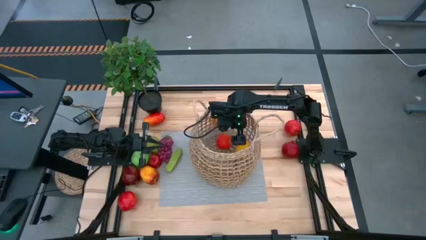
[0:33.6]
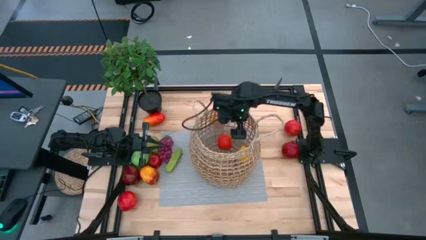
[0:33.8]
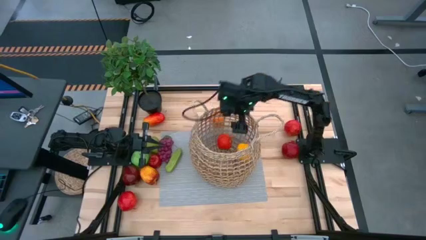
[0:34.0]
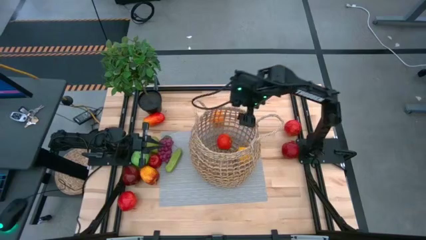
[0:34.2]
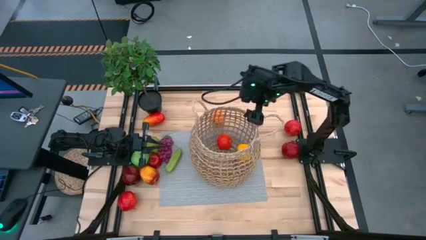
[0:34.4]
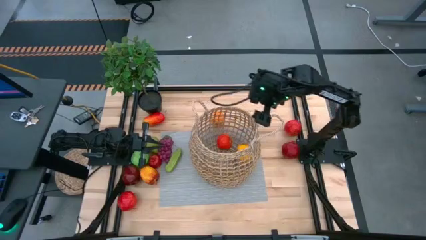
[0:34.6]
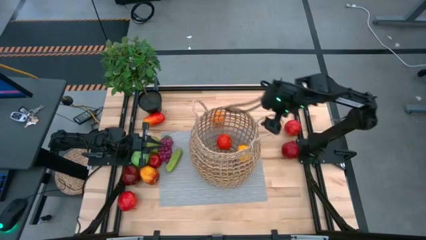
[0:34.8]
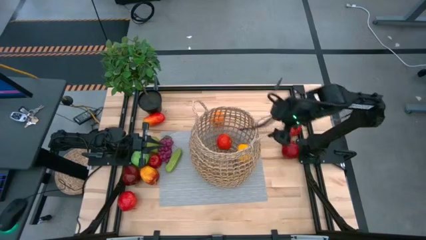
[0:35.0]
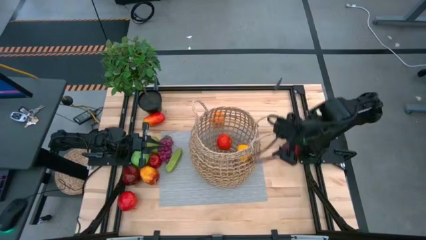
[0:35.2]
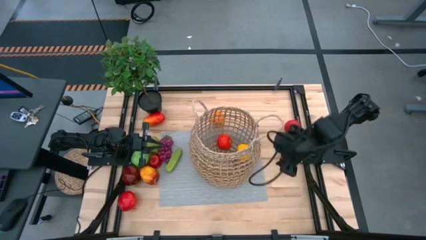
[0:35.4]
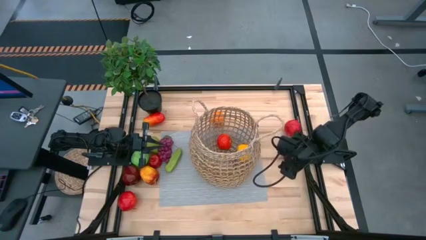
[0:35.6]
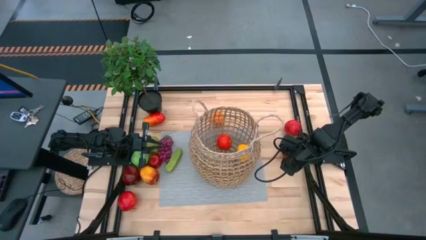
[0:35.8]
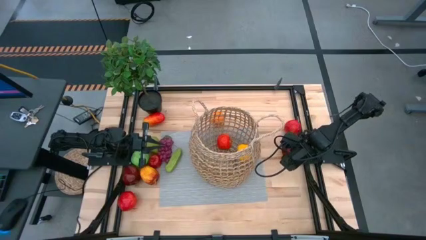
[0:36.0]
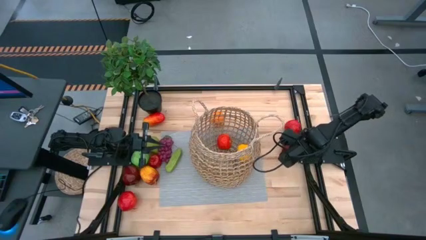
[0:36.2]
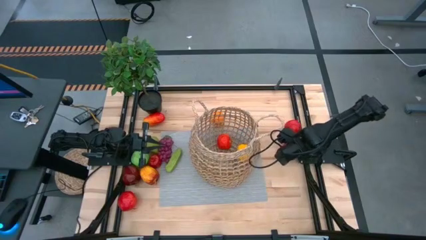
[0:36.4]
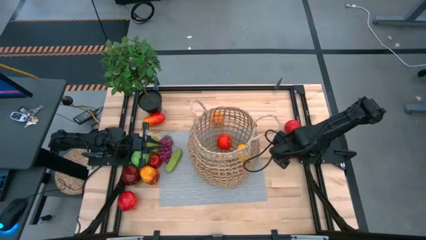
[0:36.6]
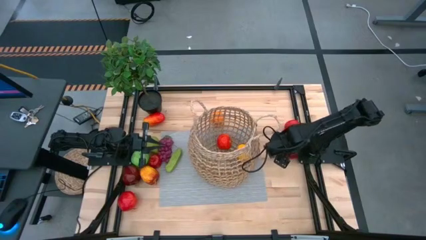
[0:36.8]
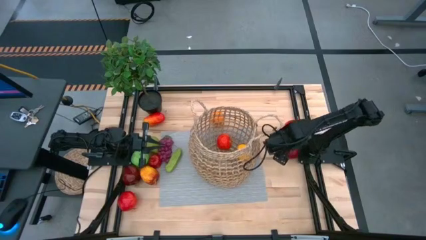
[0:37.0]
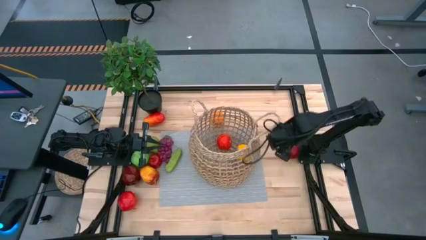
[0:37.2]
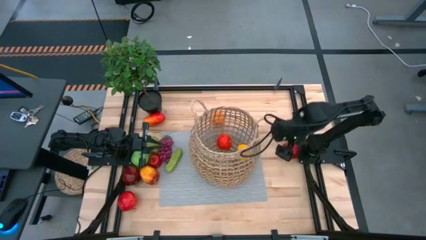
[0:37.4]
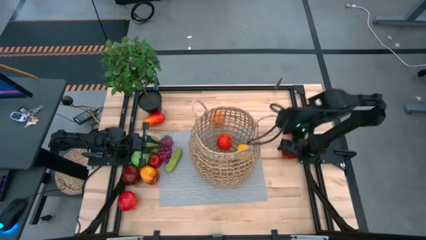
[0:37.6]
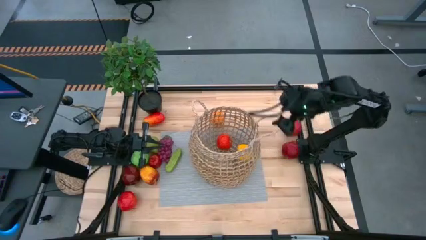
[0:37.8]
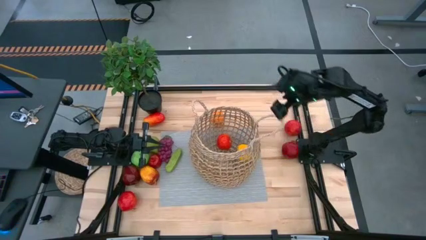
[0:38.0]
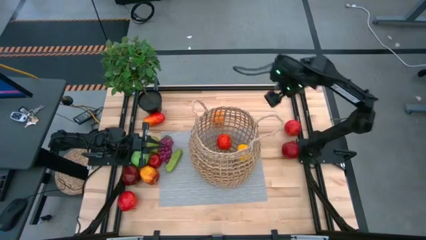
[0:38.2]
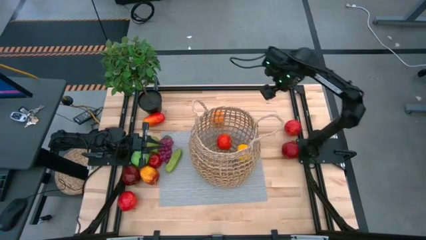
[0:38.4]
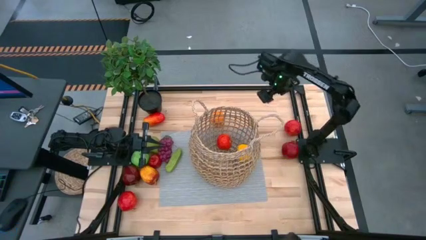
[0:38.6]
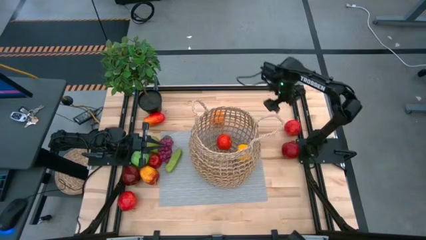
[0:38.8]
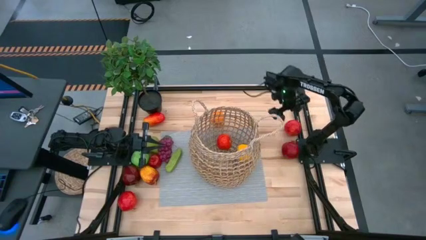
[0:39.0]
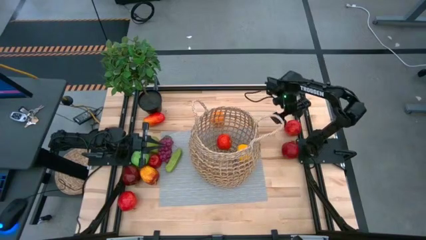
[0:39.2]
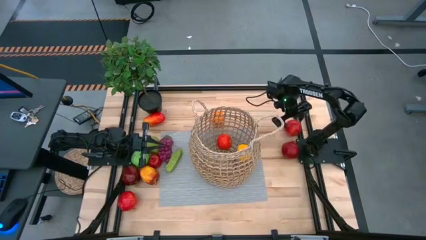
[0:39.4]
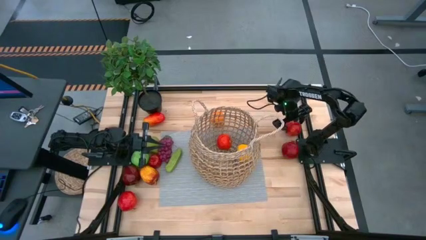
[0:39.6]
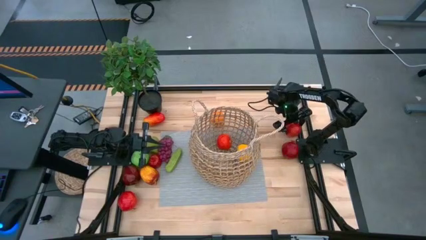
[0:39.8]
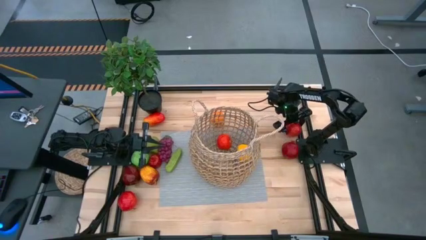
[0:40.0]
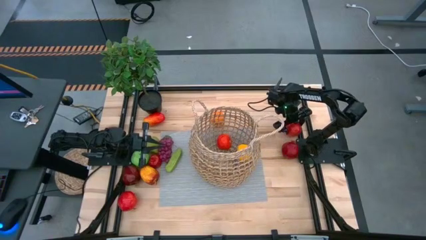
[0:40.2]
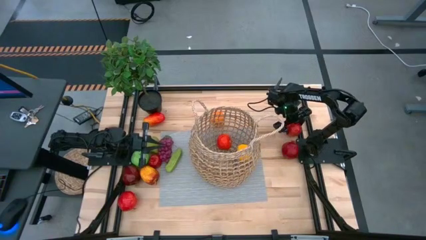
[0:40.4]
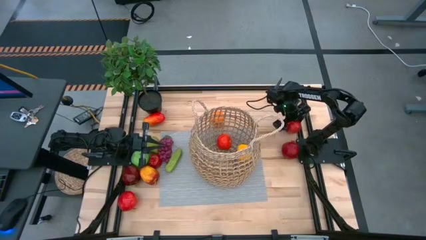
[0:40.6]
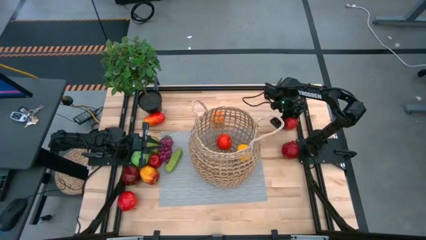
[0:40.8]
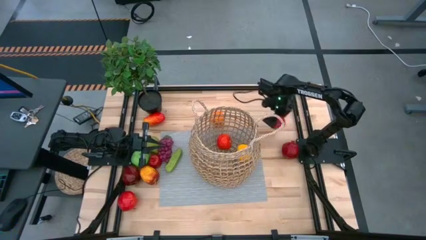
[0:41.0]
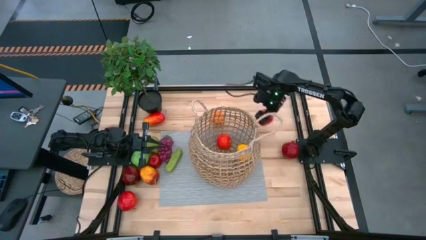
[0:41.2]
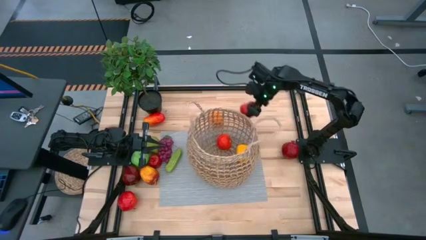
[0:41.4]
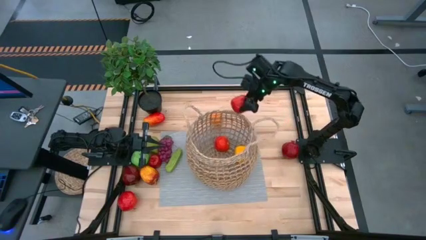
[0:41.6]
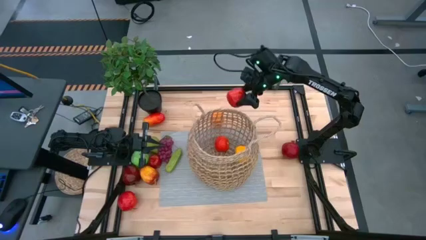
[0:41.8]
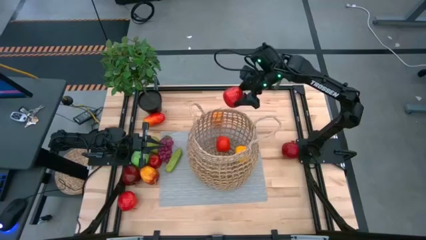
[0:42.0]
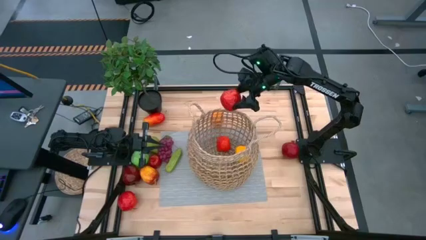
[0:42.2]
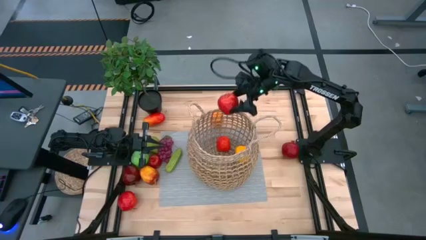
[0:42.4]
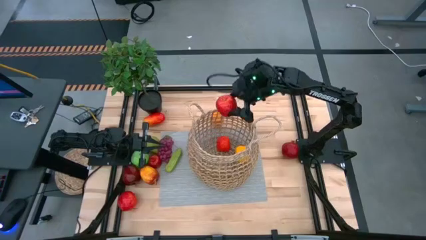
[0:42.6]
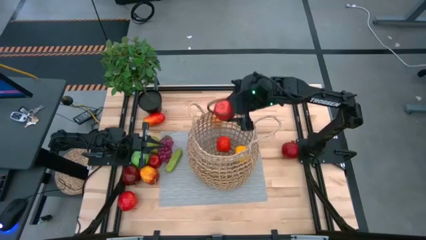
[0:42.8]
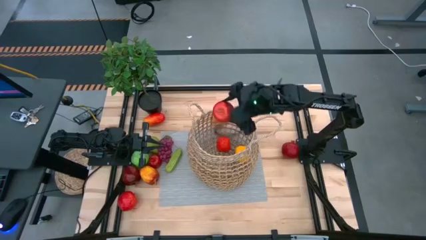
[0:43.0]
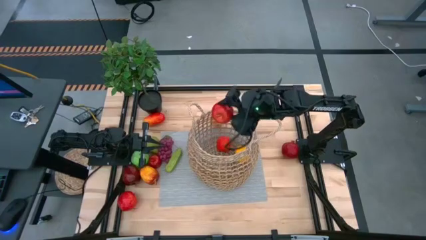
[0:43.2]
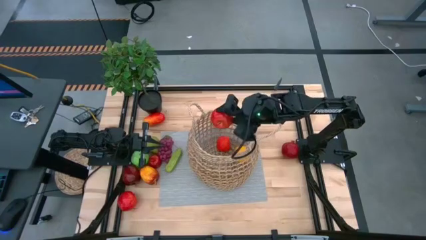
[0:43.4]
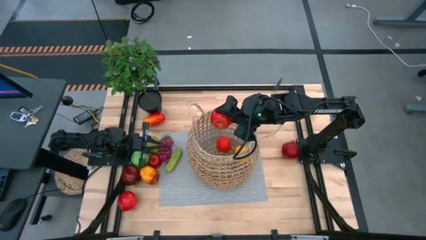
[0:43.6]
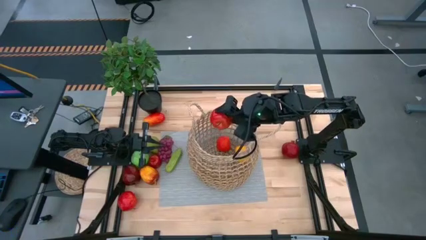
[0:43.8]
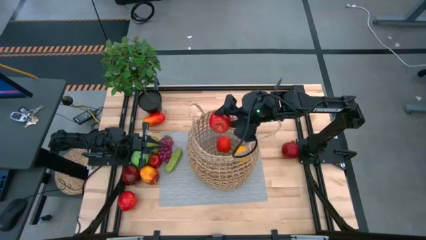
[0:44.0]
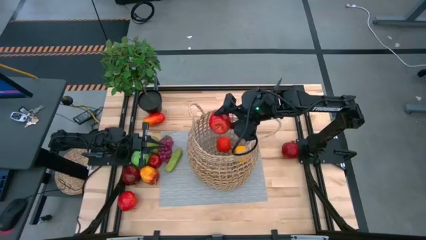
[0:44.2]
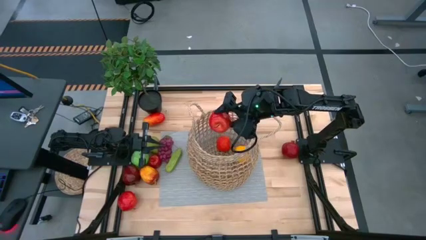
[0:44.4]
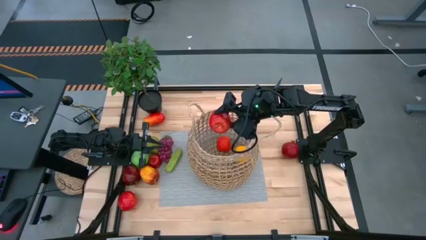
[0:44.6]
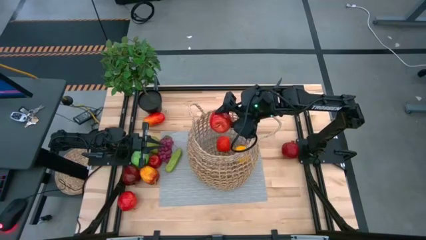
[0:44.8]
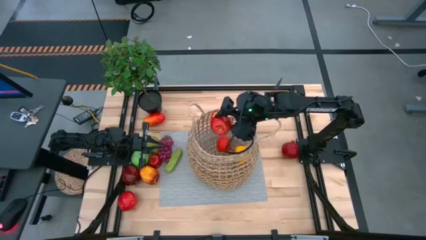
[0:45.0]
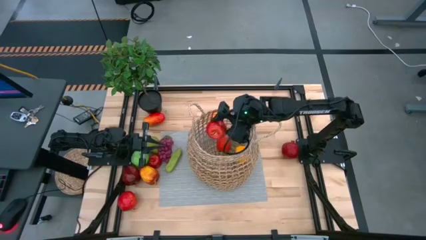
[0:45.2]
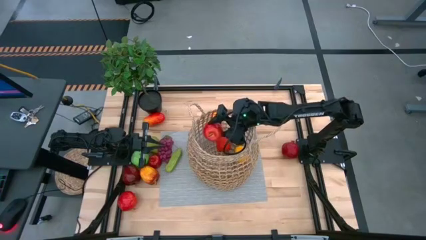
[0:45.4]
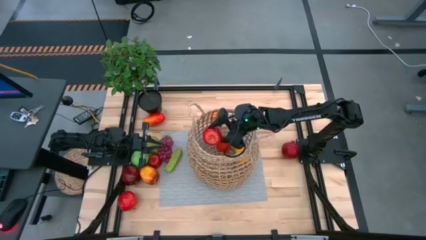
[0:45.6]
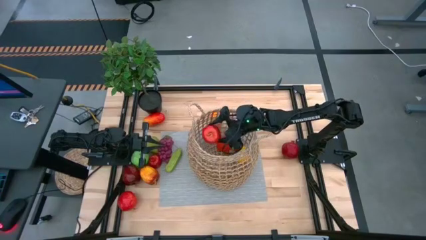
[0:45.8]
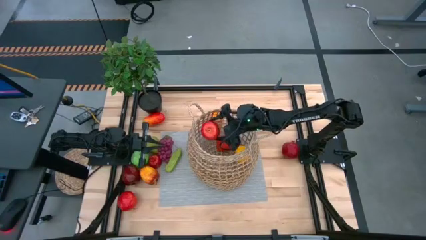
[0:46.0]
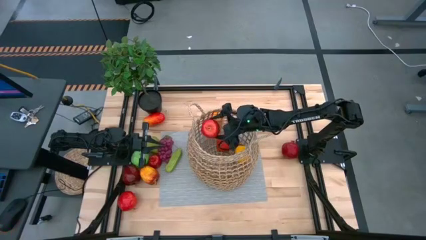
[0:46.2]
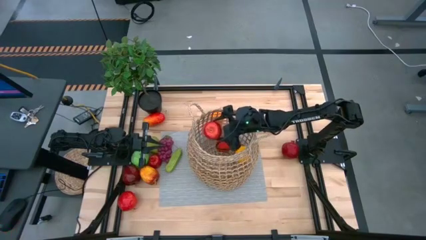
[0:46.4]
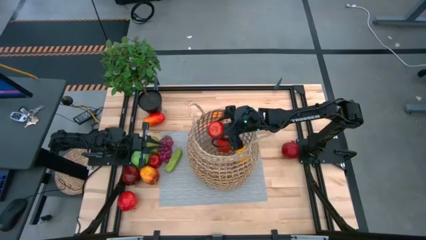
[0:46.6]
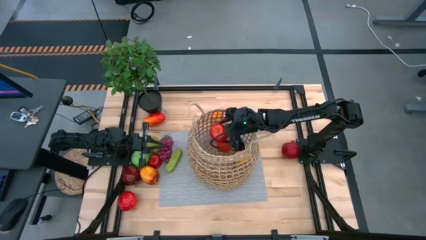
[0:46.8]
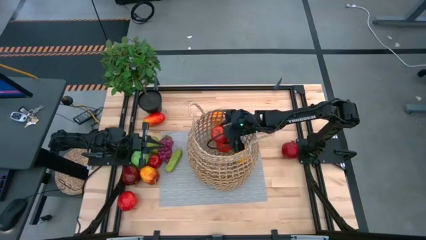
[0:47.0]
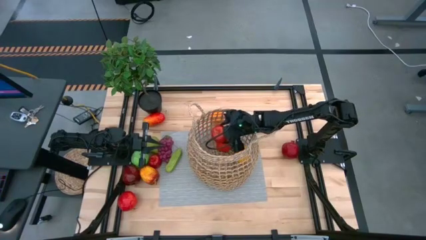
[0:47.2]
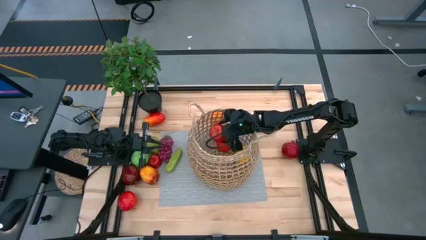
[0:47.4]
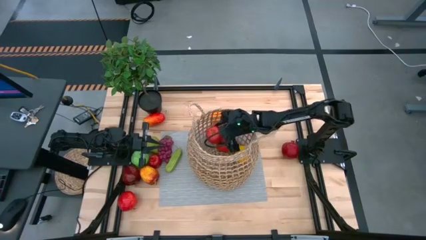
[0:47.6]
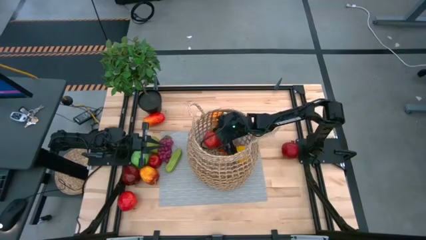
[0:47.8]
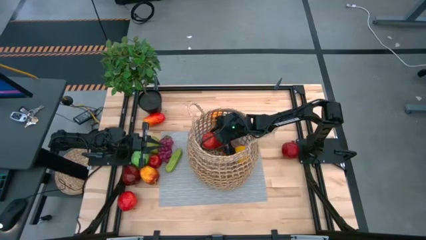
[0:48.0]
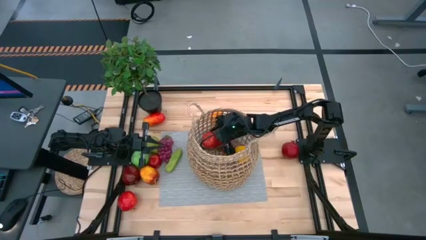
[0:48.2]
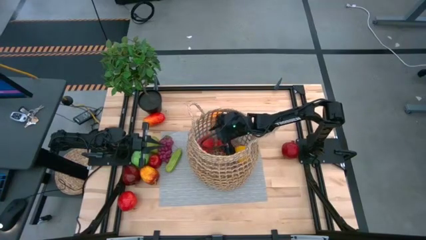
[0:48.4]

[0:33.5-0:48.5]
Task: Build produce basket
Put the red apple into the brown basket

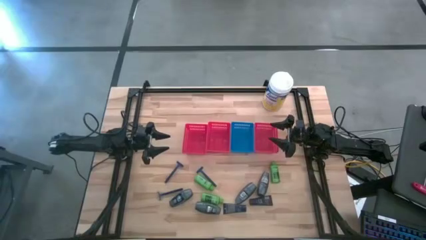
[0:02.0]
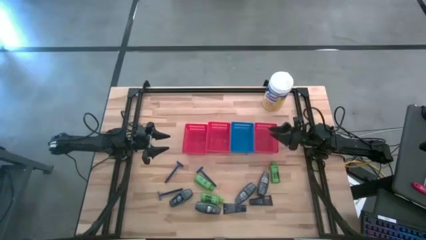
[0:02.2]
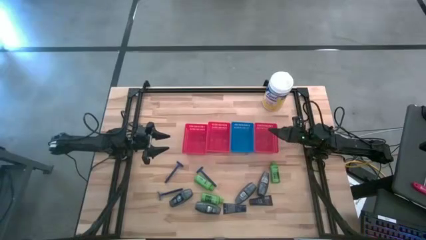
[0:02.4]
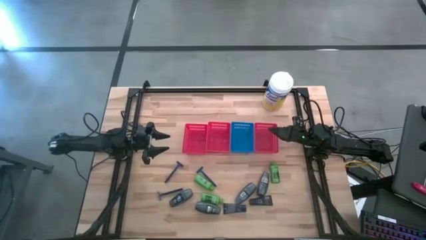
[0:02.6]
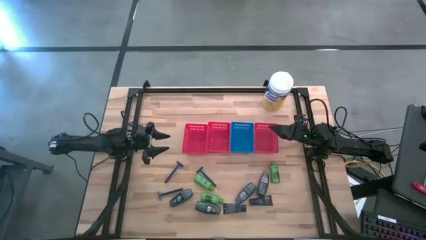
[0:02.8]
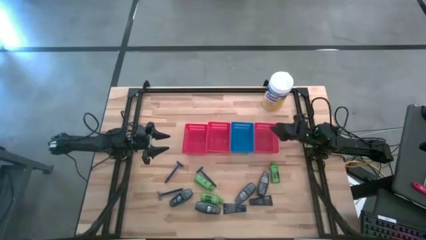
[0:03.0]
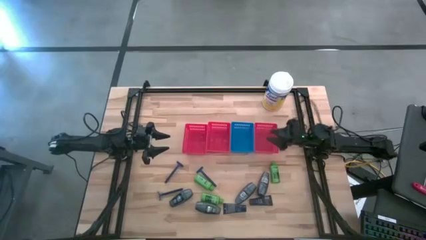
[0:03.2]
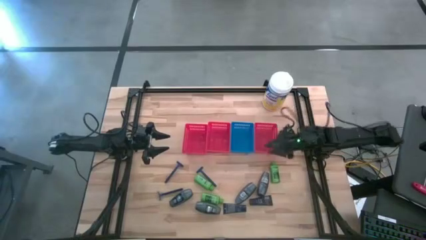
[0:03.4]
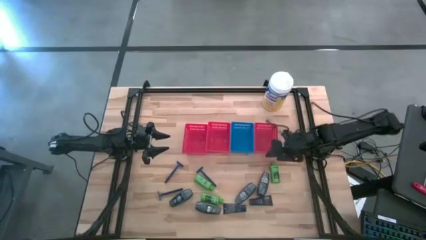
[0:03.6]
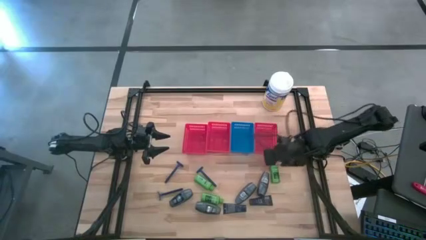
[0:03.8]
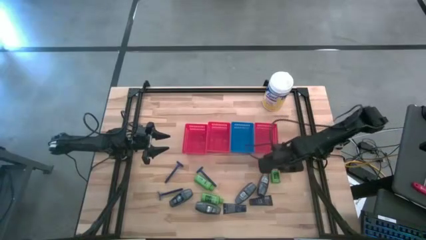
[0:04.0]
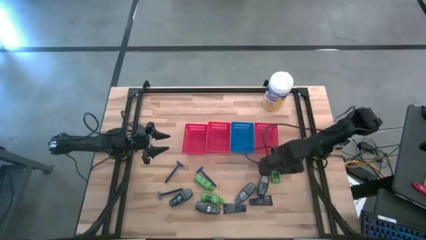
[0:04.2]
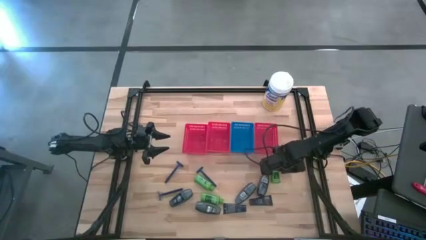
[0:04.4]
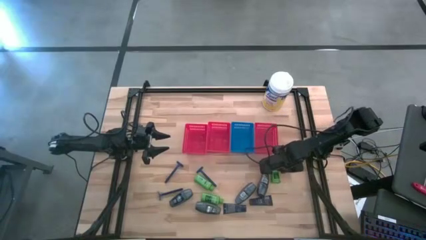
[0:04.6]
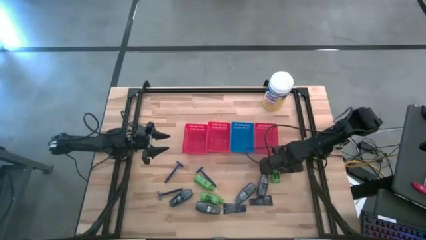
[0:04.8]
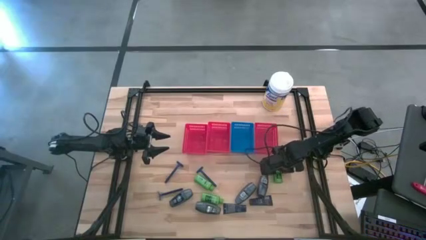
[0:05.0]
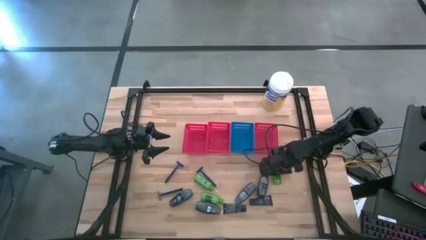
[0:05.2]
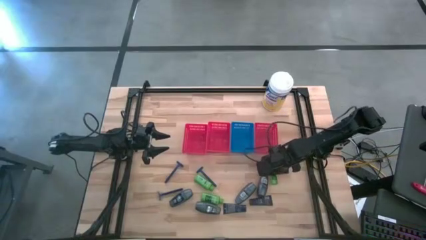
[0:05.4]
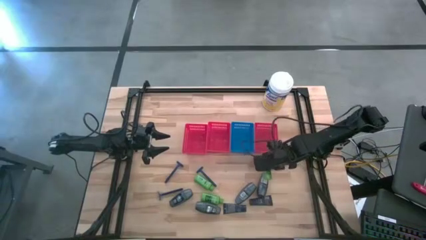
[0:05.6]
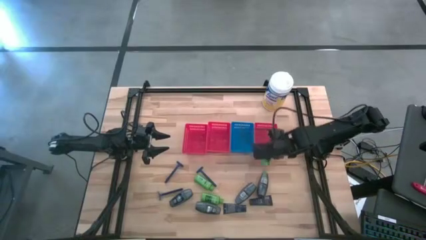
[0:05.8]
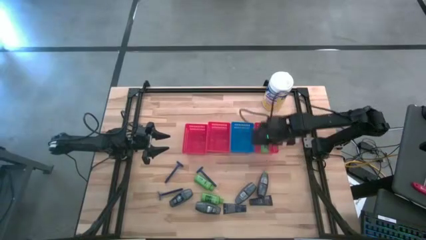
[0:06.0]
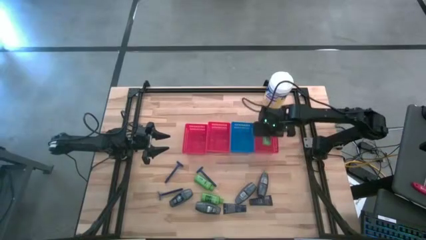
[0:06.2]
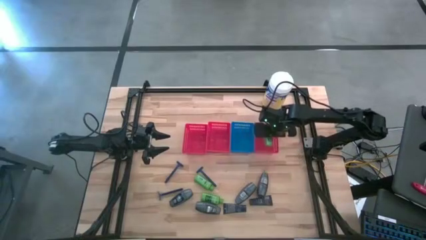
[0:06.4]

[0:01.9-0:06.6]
Task: Pick & Place Travel size toiletries
Put the green shampoo into the right red bin
